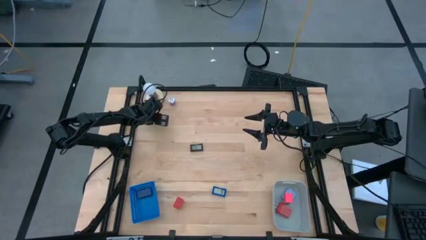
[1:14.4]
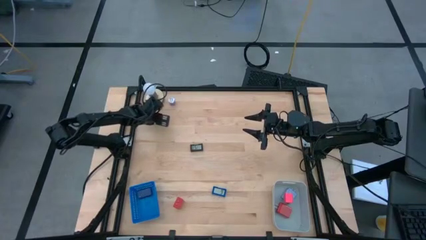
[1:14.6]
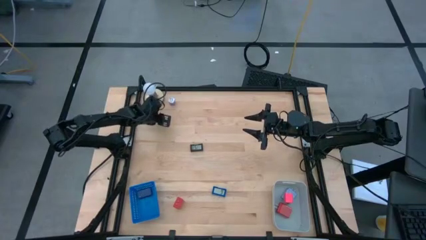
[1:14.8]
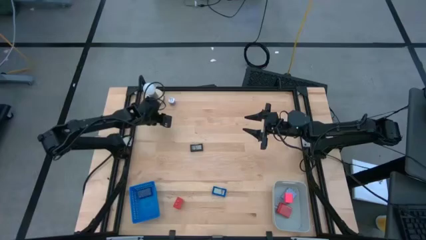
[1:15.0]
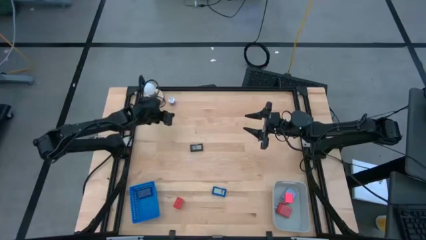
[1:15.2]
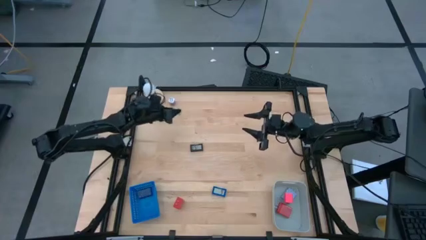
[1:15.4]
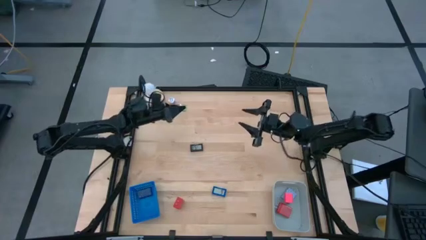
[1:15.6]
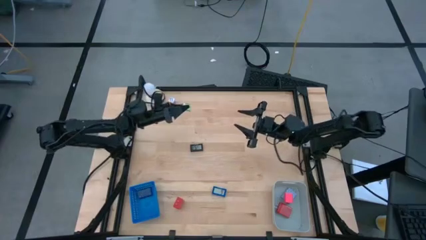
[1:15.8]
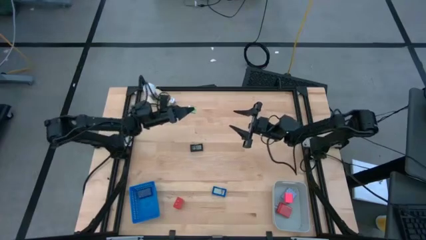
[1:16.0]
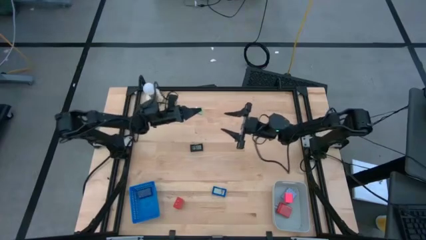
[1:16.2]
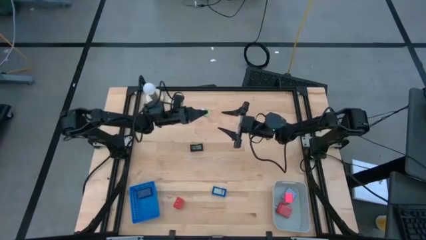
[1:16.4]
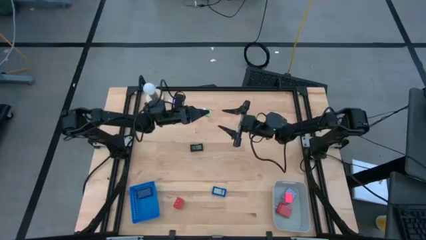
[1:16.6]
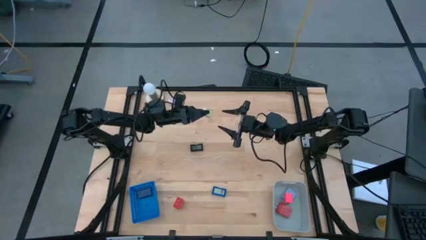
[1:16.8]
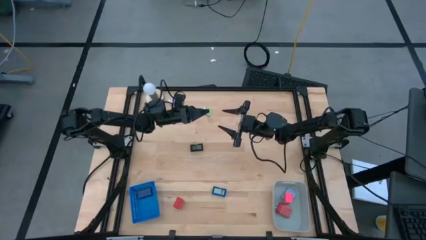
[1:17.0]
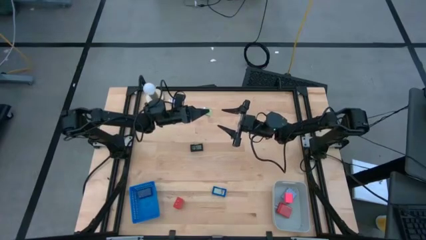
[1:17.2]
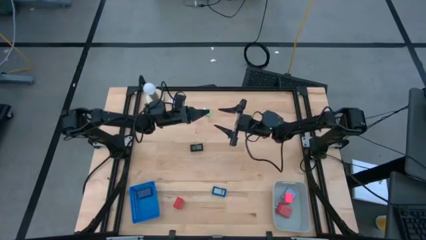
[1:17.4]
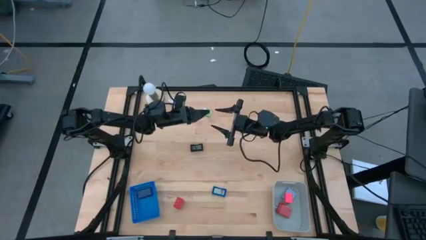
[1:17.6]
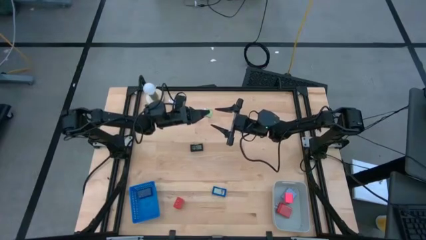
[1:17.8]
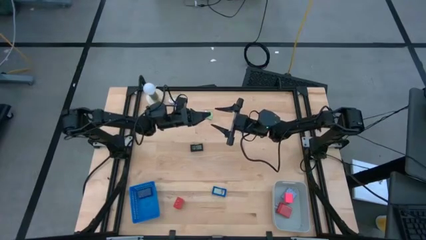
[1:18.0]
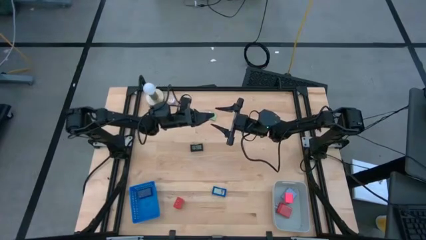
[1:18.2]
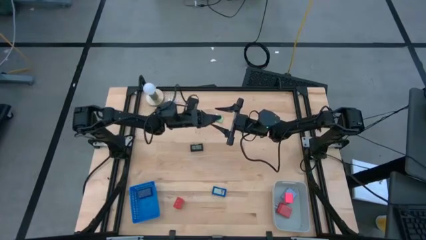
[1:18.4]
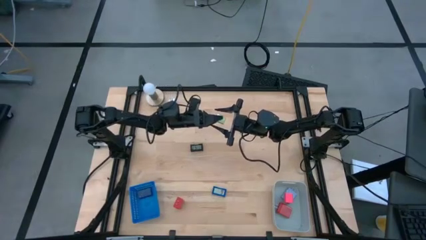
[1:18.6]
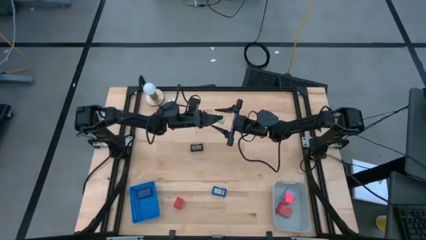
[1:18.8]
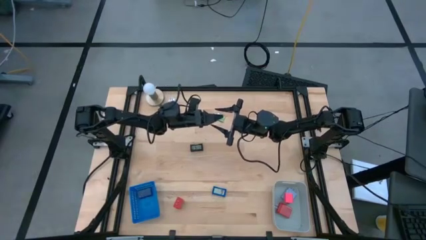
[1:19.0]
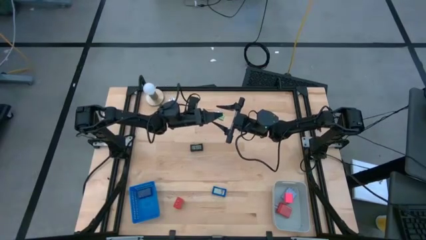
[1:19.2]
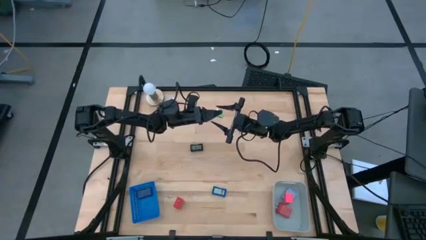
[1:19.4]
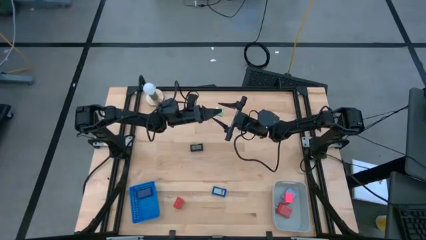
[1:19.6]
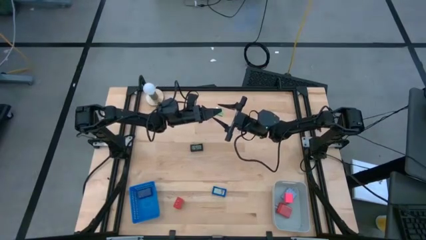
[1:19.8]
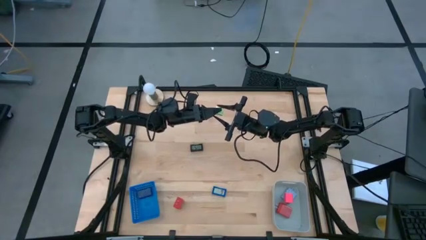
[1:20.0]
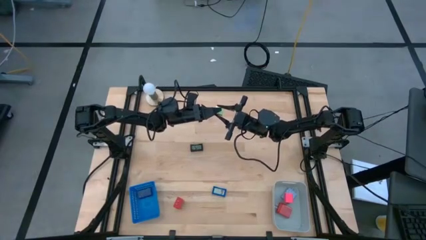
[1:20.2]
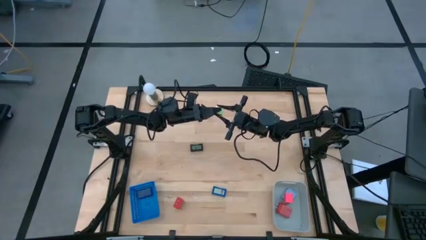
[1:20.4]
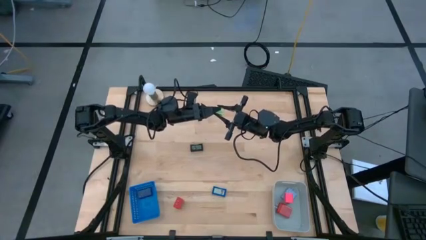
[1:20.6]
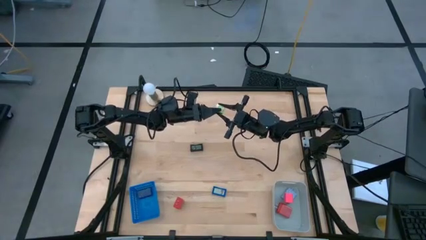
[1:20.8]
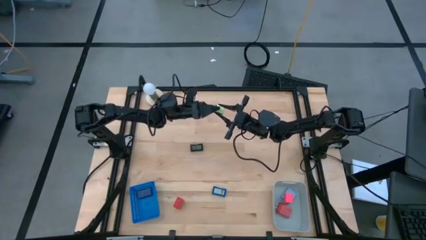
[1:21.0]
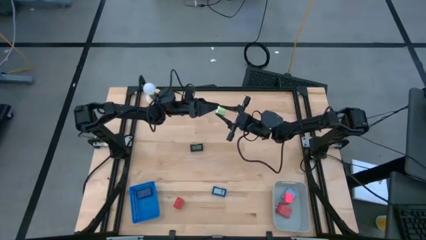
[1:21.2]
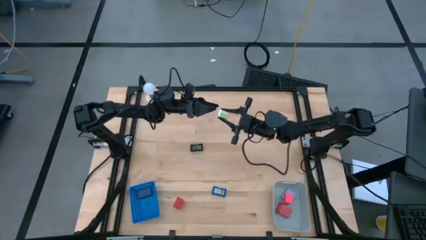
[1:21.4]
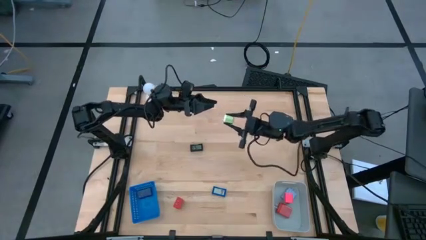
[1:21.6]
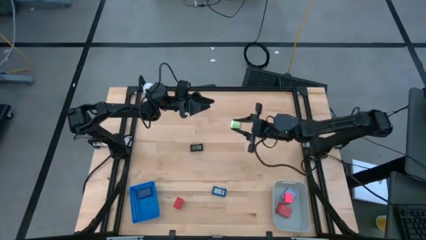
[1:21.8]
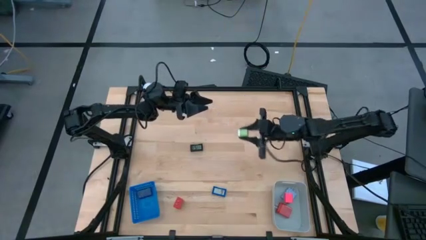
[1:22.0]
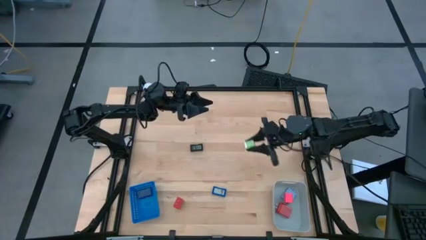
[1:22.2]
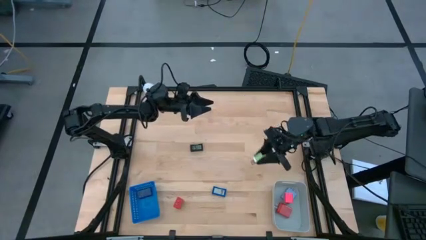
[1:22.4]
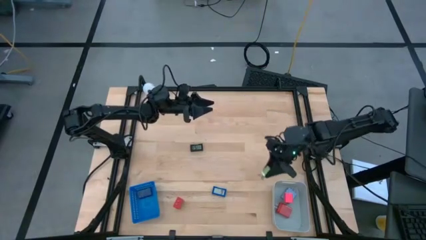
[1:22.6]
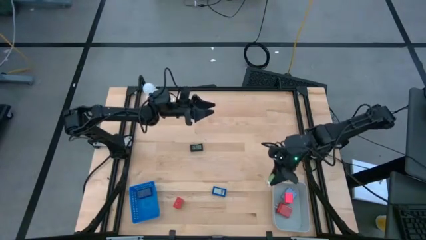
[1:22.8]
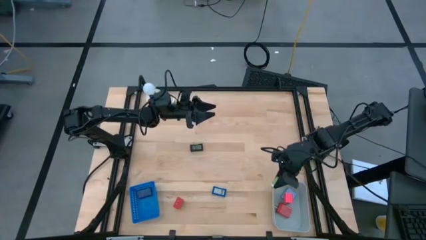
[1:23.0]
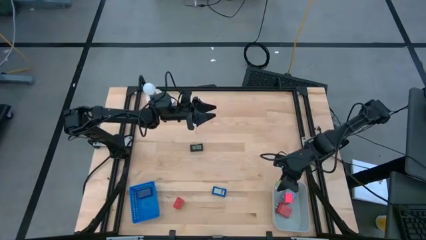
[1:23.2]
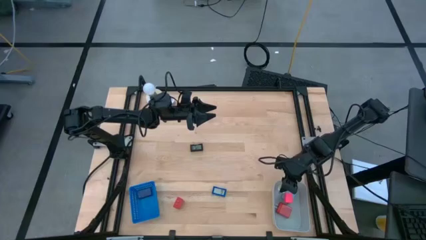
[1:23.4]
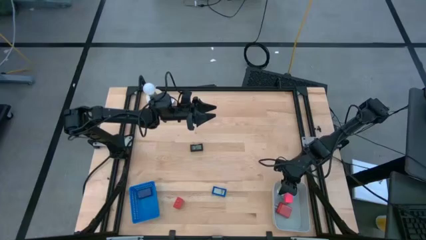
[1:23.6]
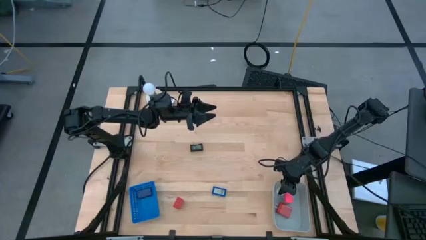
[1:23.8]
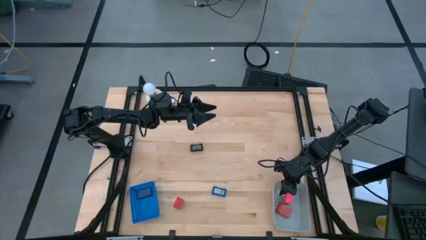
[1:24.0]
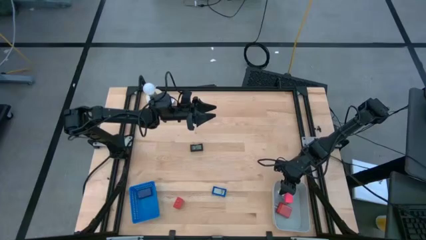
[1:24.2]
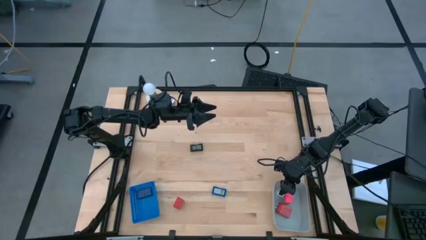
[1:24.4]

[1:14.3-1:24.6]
Task: Pick & Place Office items
Put the light green charger adapter into the gray bin

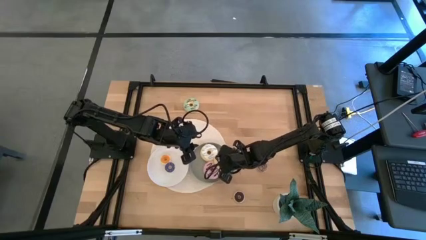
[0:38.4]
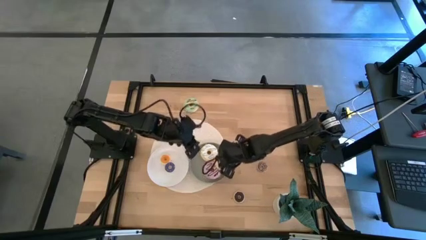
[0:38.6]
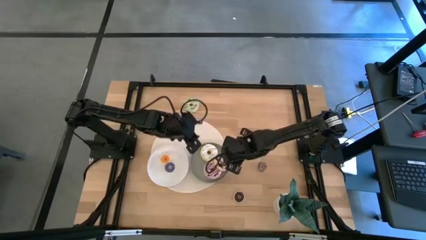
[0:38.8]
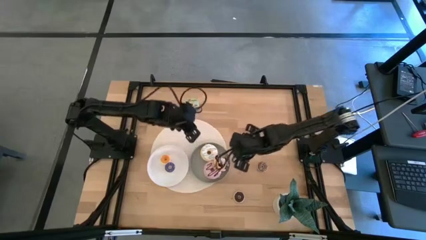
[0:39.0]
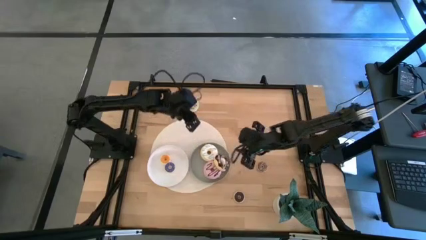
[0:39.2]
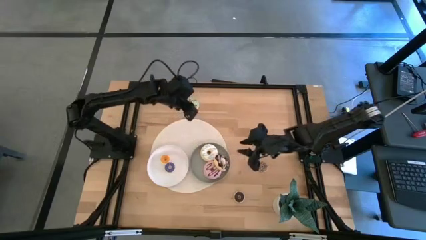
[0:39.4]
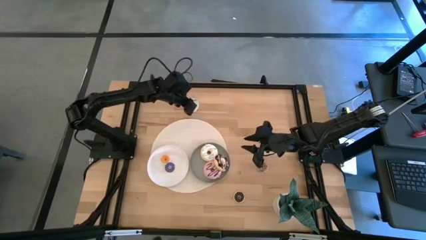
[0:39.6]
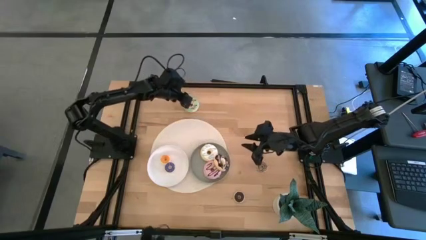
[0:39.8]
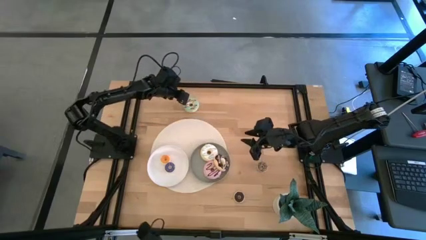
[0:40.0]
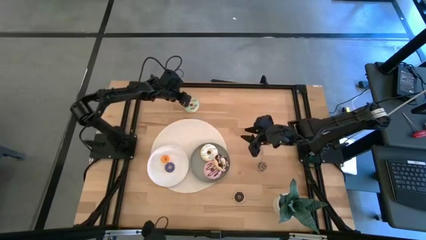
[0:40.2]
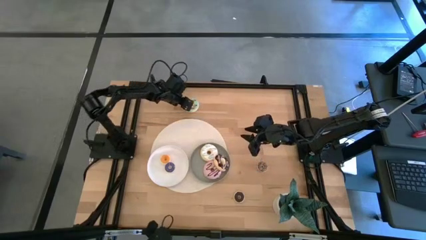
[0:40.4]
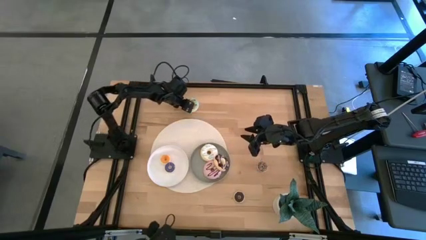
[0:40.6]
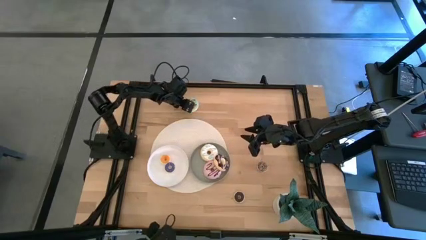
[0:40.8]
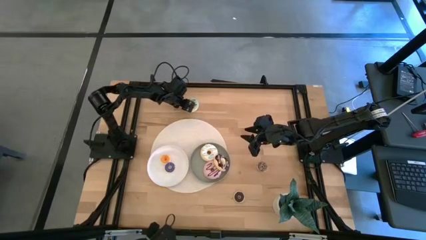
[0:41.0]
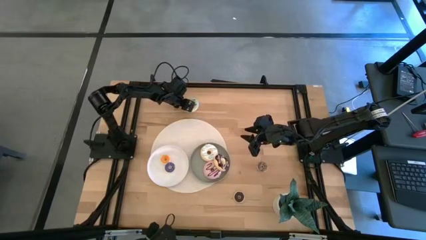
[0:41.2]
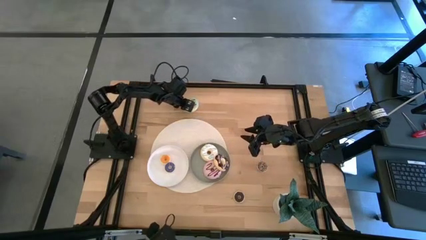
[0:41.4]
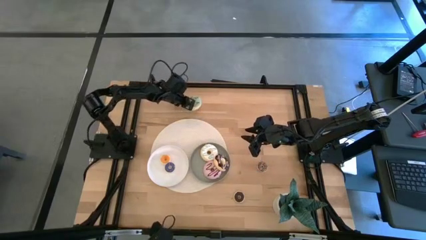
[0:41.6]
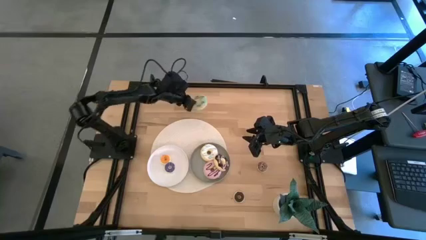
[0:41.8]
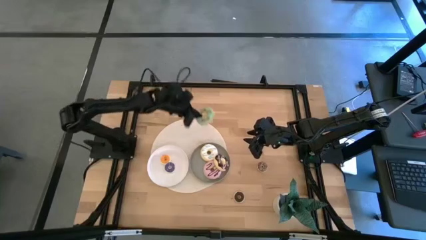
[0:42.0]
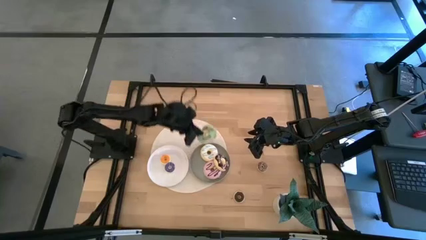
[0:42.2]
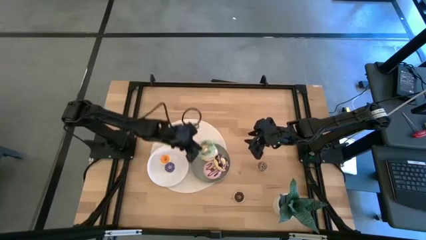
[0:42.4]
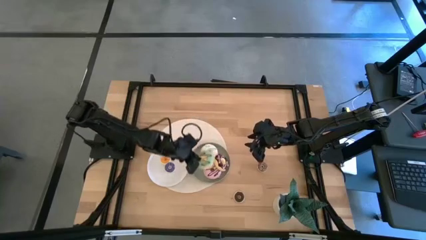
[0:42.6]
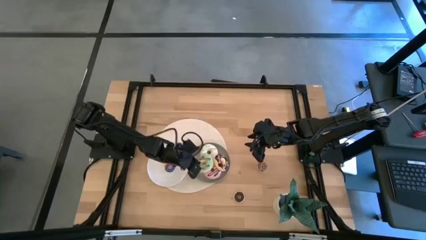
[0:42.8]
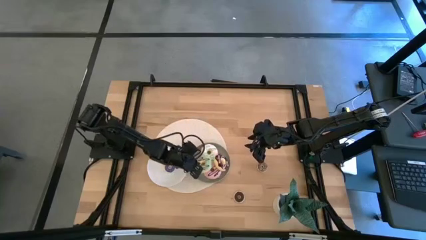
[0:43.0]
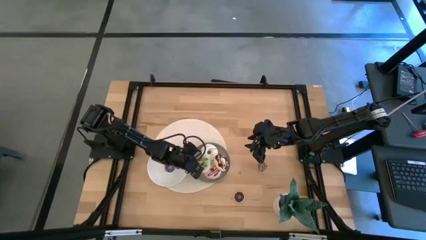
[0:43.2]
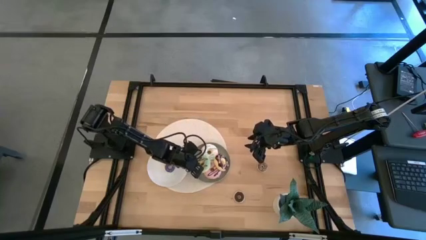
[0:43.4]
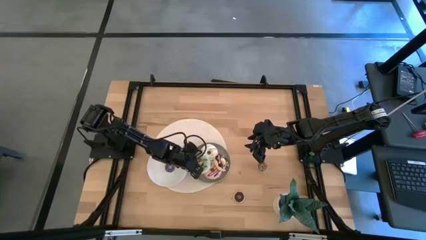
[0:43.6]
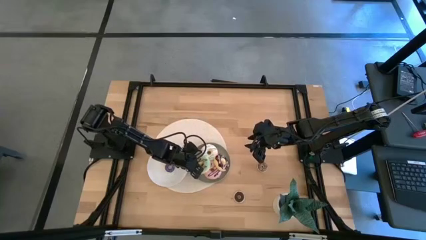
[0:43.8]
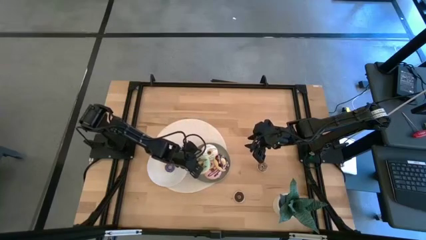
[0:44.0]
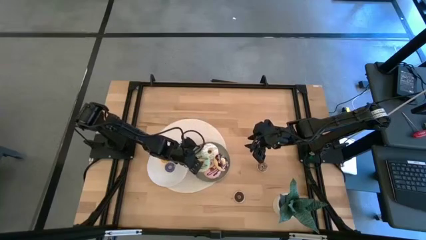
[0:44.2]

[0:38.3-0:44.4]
Task: Pick & Place donuts
Put the big green donuts on the gray plate
